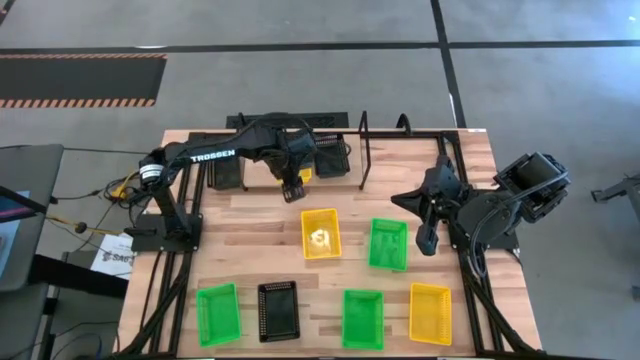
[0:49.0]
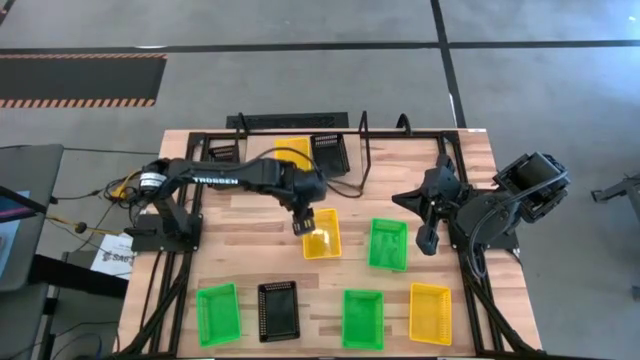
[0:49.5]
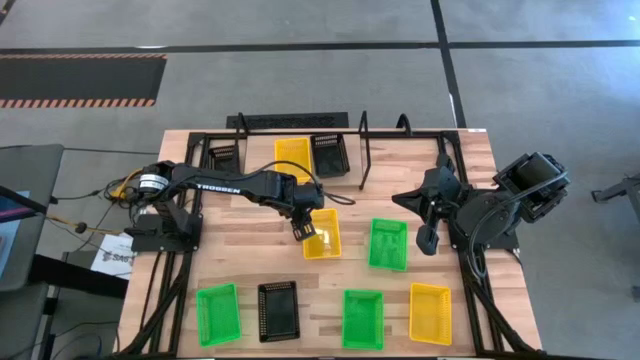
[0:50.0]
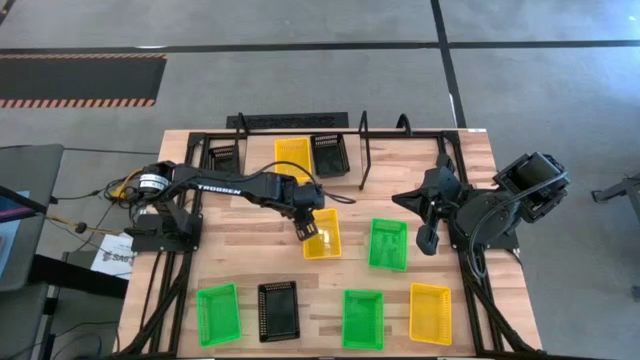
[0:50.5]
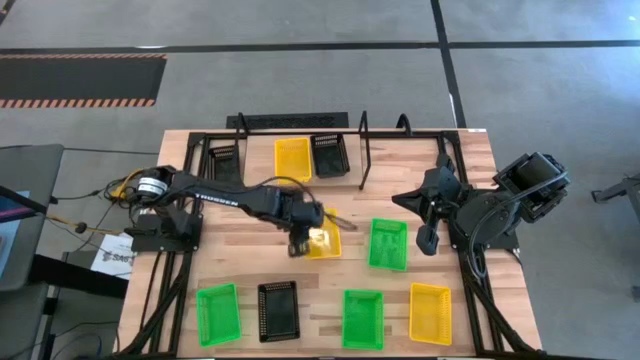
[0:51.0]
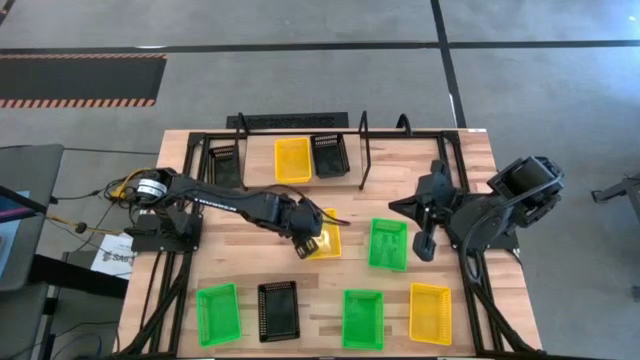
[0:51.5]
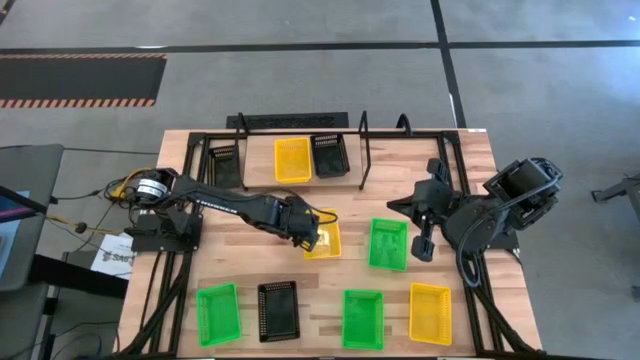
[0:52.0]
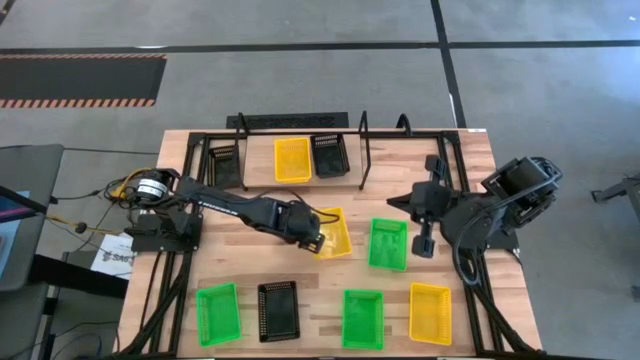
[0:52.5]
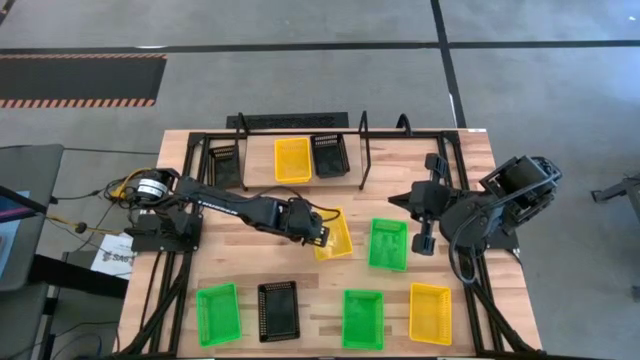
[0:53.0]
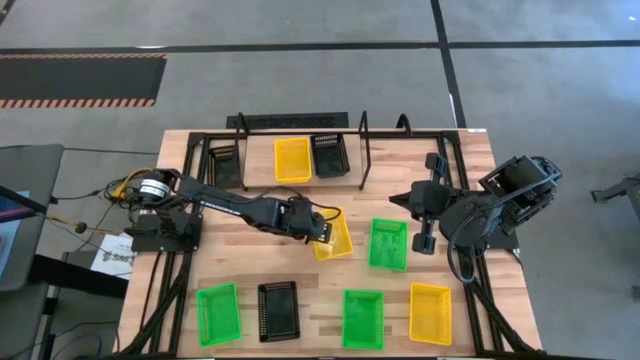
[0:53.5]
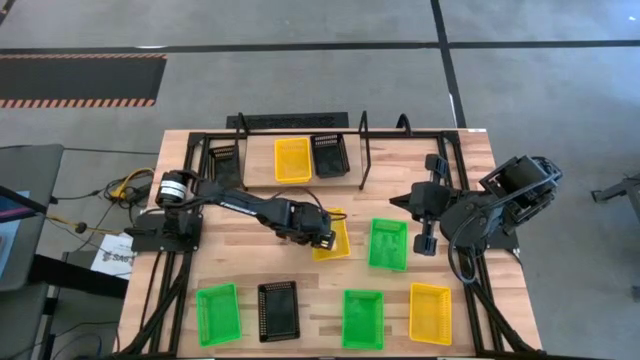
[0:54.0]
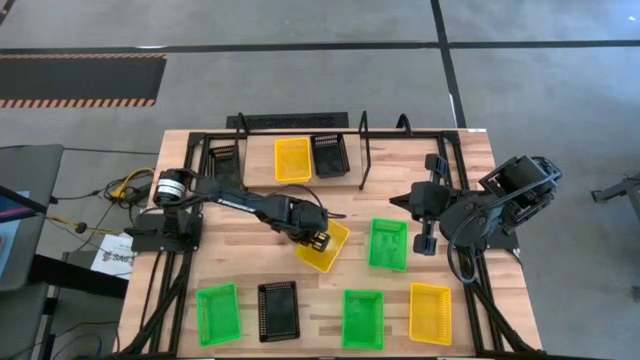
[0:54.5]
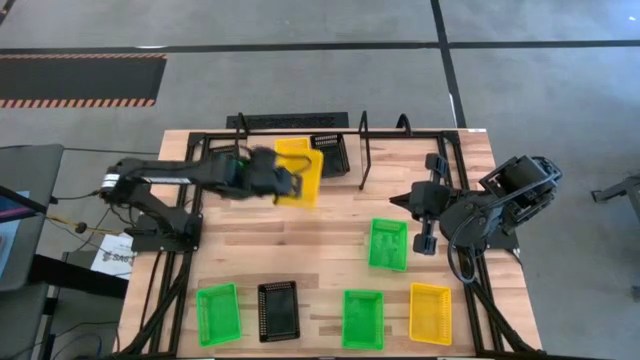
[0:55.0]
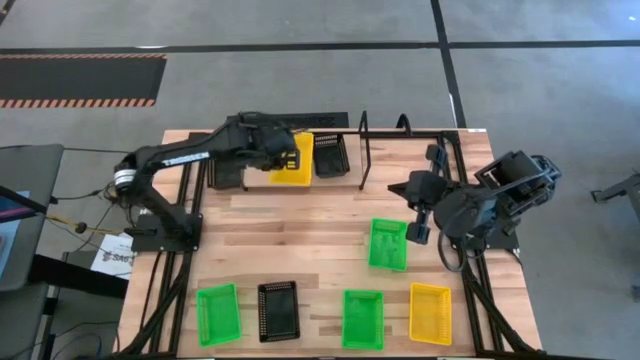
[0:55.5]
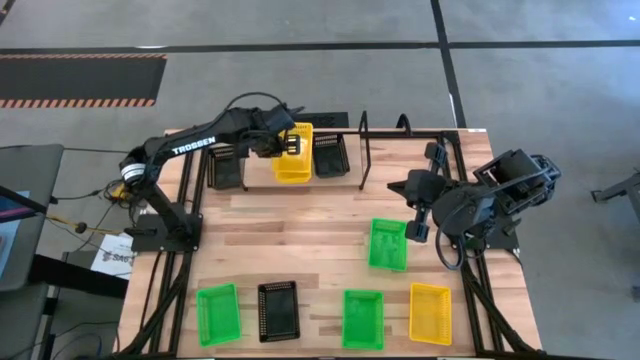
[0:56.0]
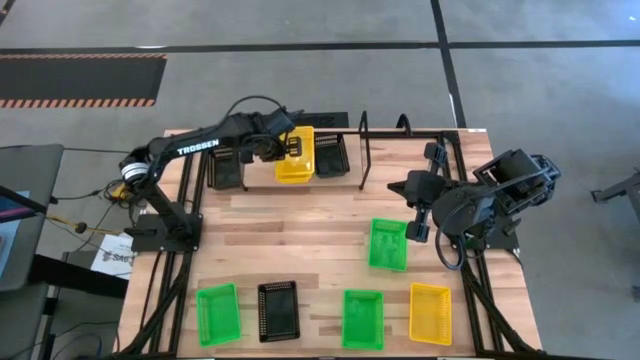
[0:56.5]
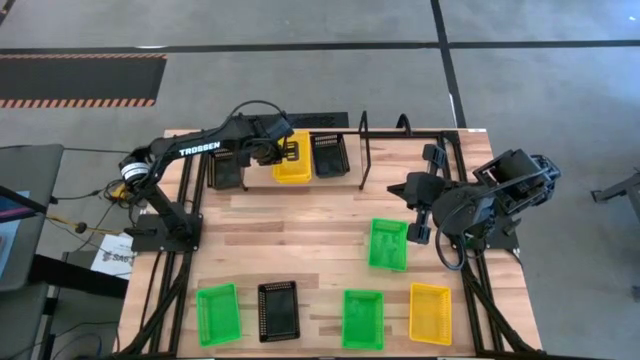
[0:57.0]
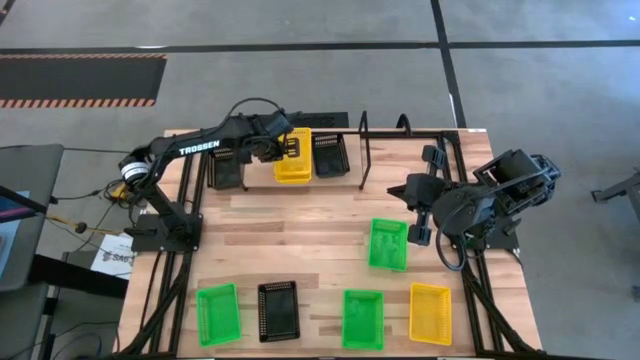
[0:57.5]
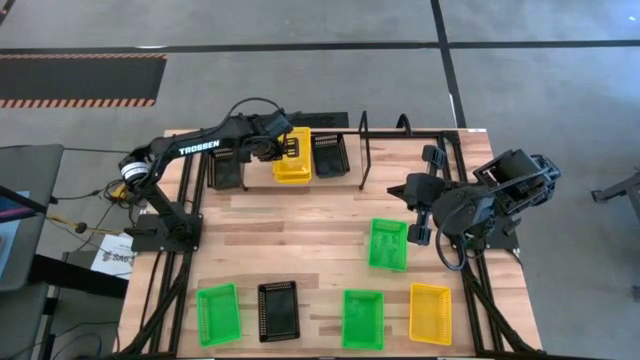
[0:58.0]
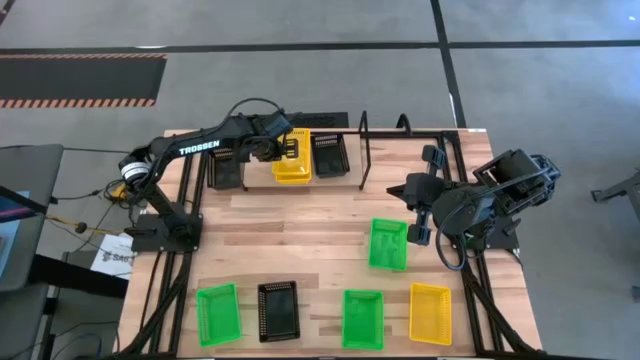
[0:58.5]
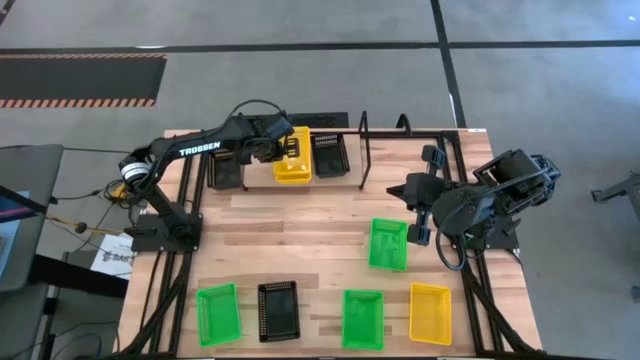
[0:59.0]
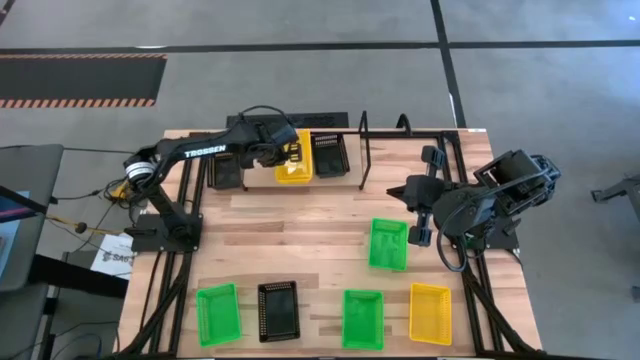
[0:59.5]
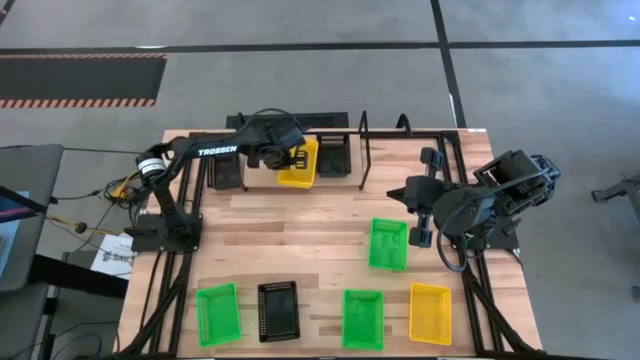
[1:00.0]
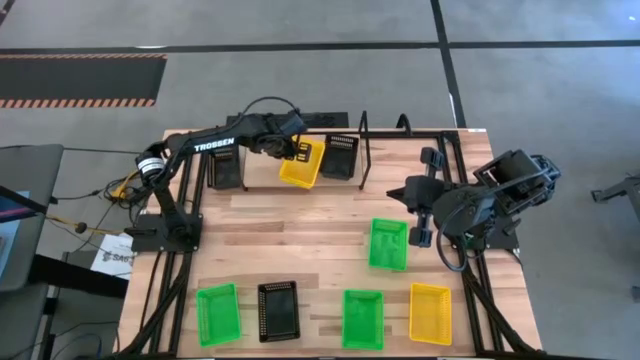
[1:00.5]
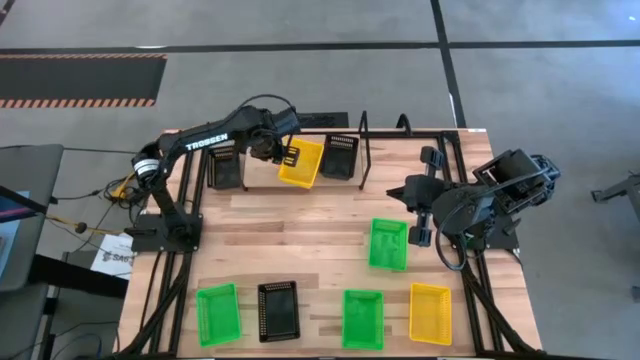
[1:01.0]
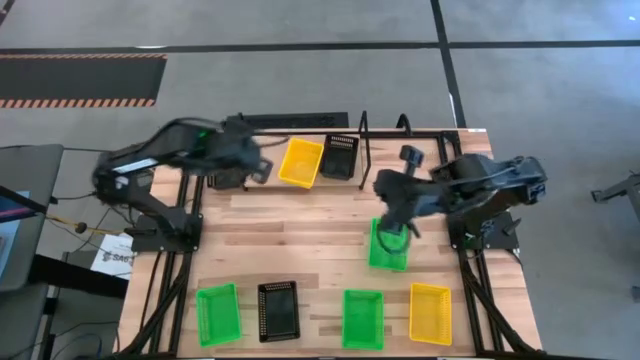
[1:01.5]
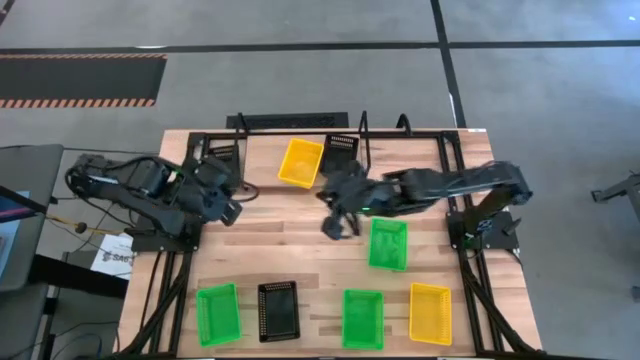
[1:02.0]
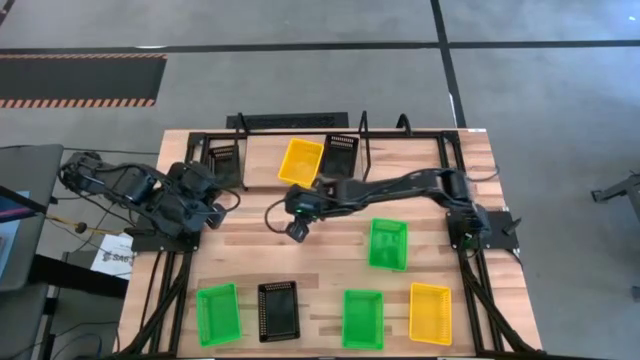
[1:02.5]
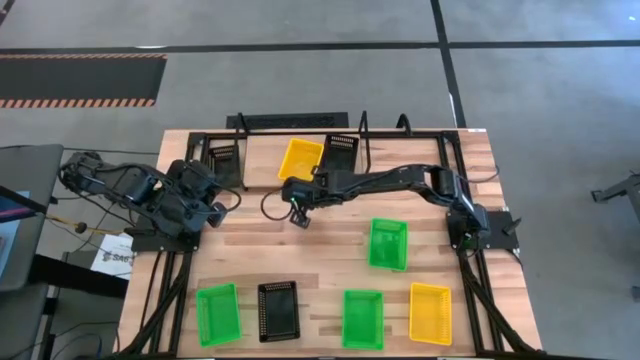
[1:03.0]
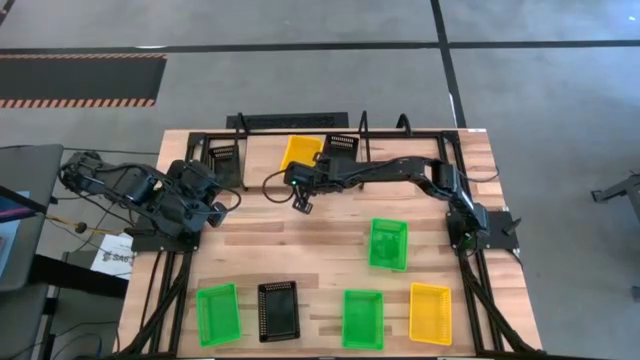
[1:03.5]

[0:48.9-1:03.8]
Task: Stack baskets on shelf by color
Stack the top yellow bin on top of the yellow bin on the shelf

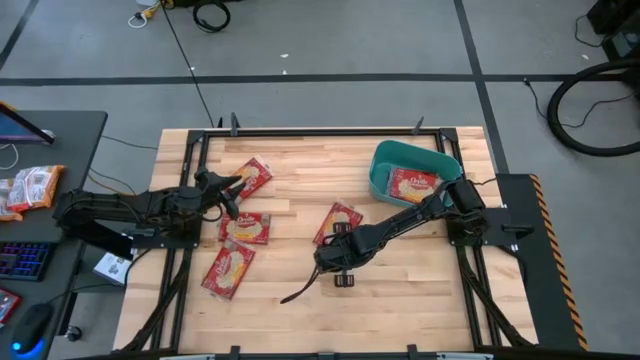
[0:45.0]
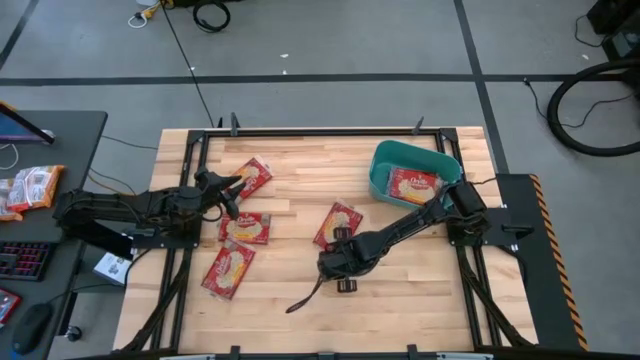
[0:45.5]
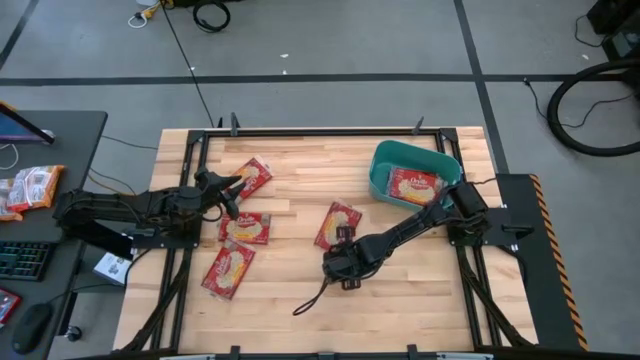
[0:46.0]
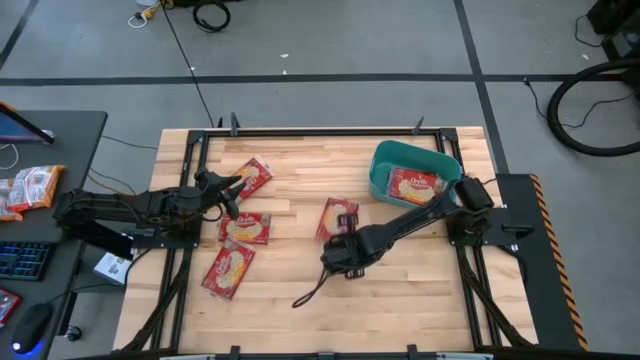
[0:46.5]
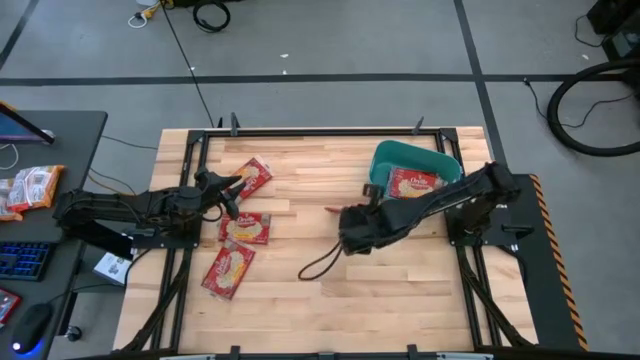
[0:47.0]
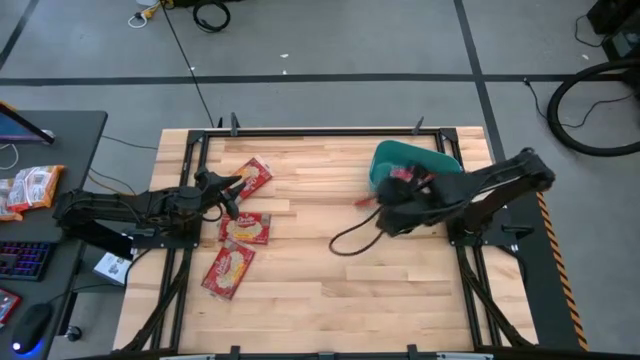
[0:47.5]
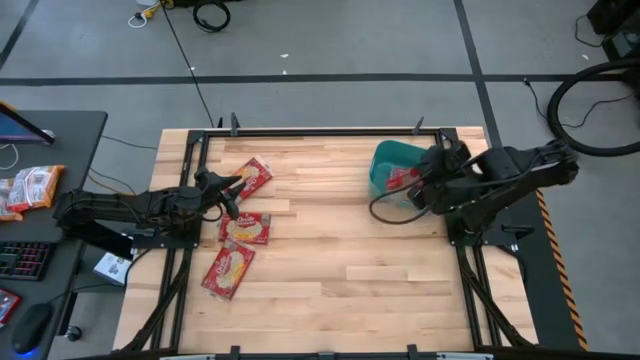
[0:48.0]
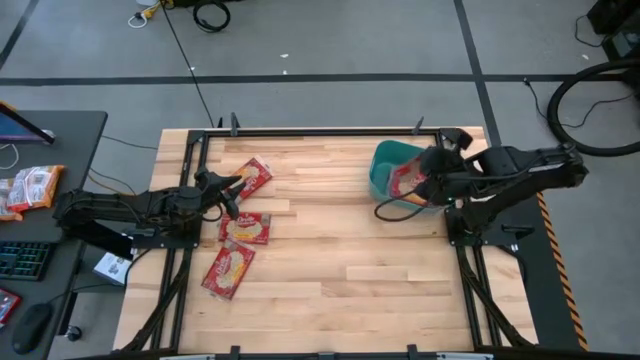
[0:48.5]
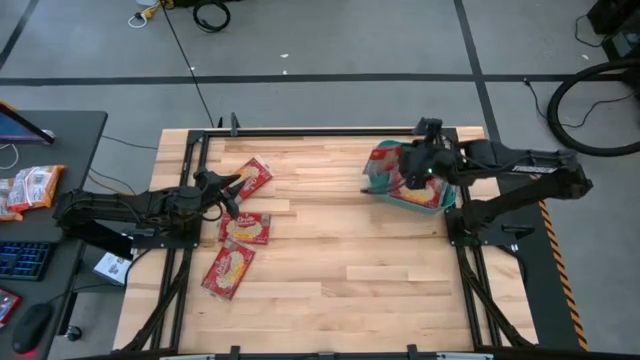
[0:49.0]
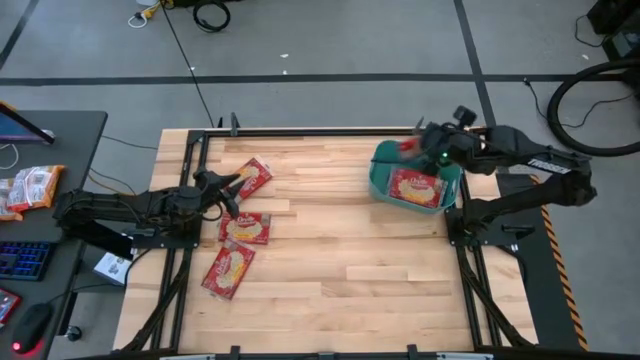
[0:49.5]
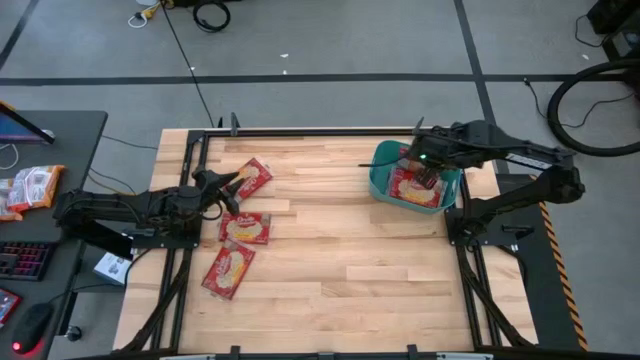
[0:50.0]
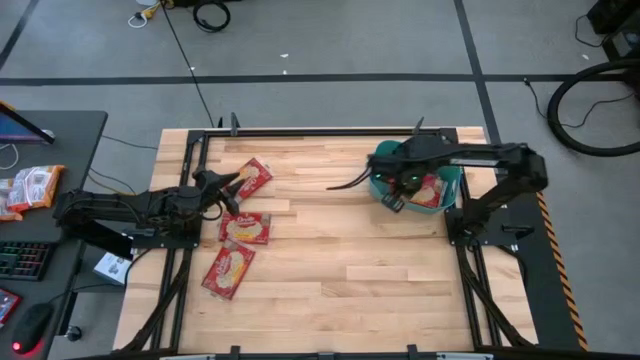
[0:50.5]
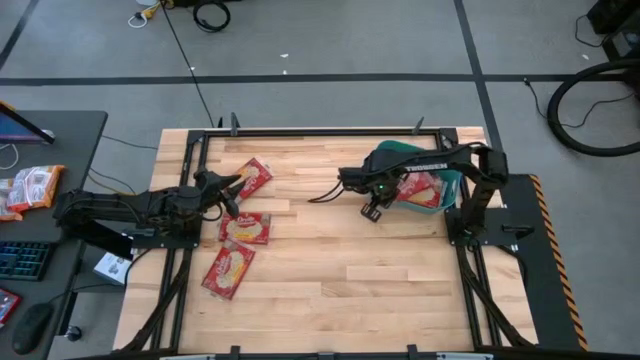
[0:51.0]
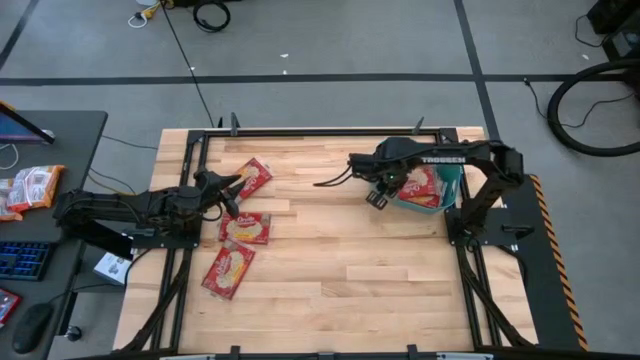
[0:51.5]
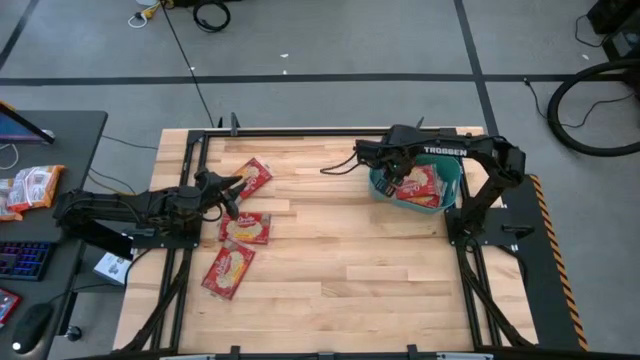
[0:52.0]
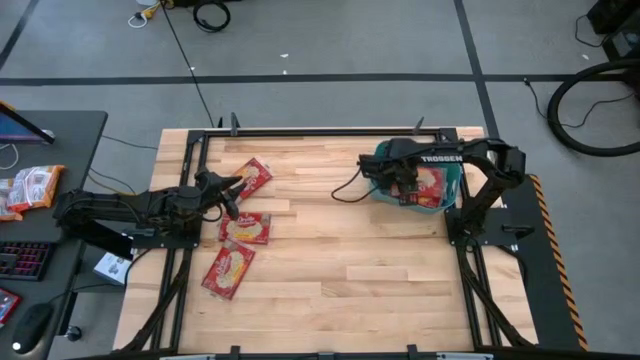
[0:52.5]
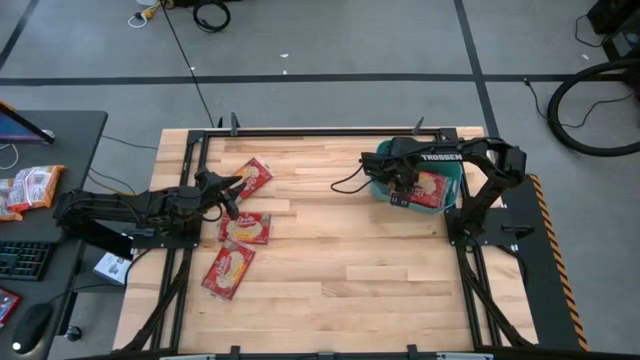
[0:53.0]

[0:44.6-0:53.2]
Task: Sort popcorn bags into baskets
Put the red popcorn bag into the green container
